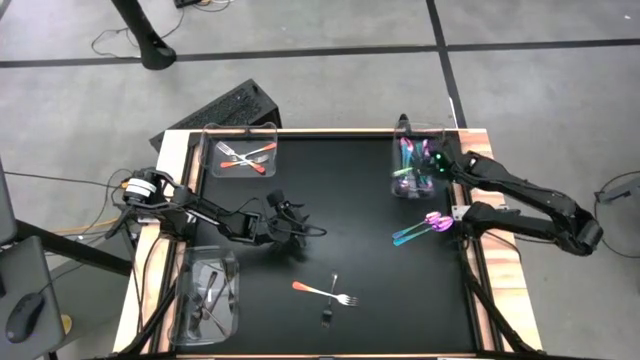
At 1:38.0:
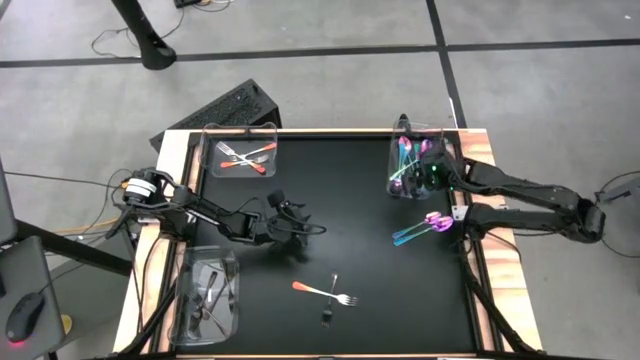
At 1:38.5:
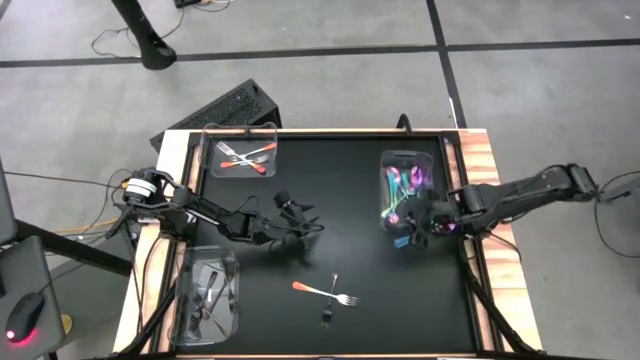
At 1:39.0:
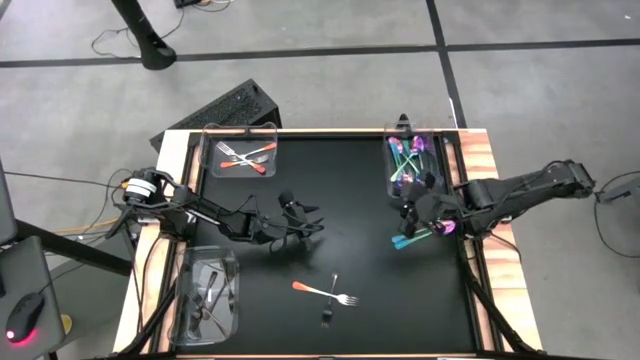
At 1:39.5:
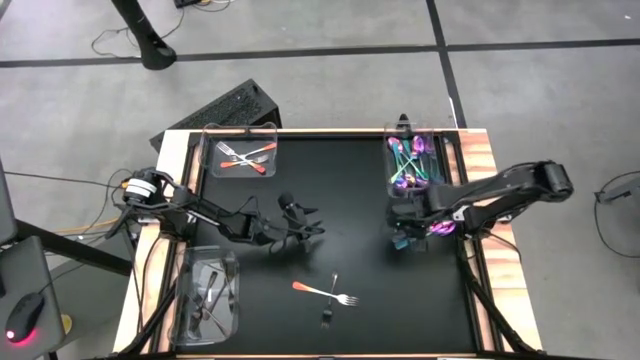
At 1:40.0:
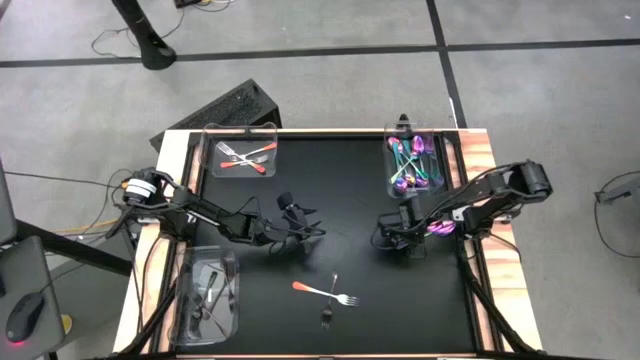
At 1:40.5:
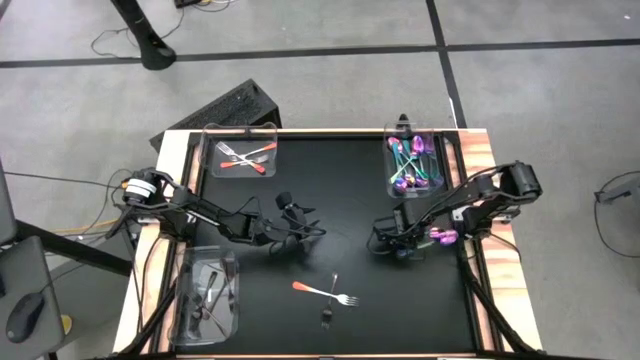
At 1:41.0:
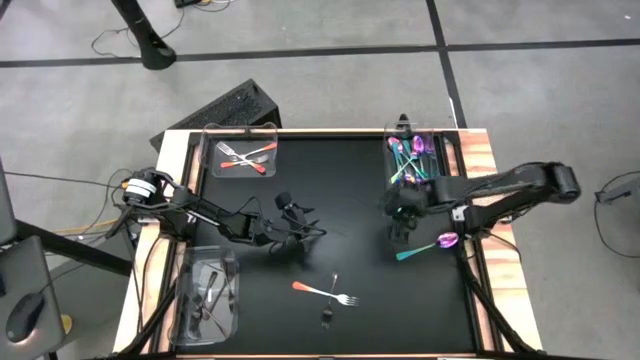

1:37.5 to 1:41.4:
Task: Sort silverware by color (type)
Put the violet spoon into the top right transparent bin

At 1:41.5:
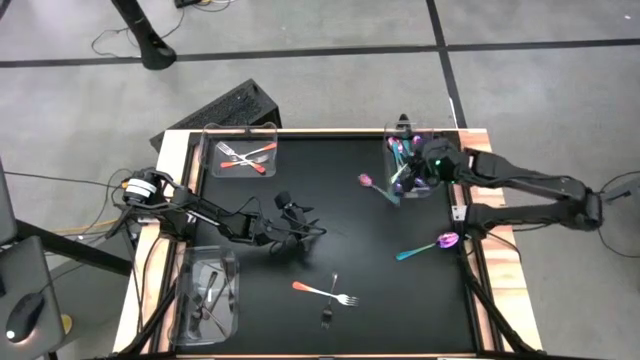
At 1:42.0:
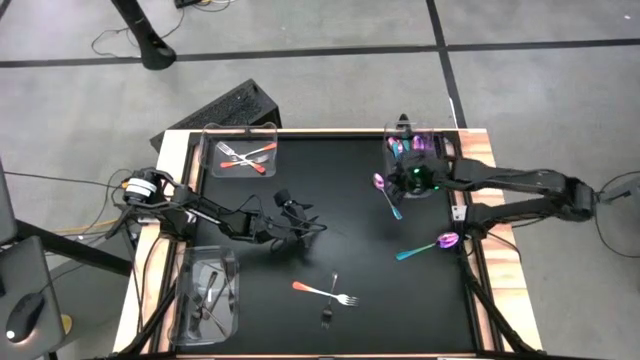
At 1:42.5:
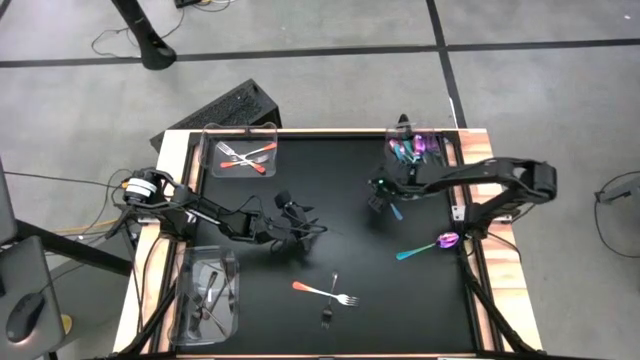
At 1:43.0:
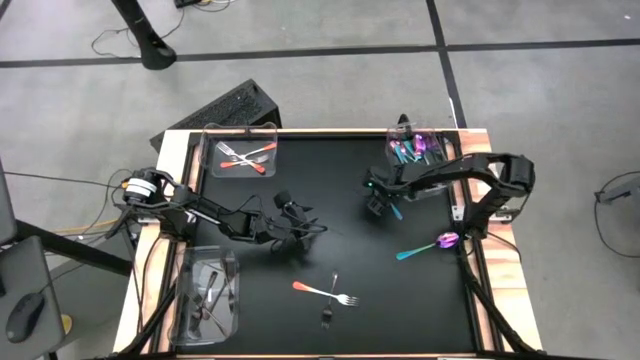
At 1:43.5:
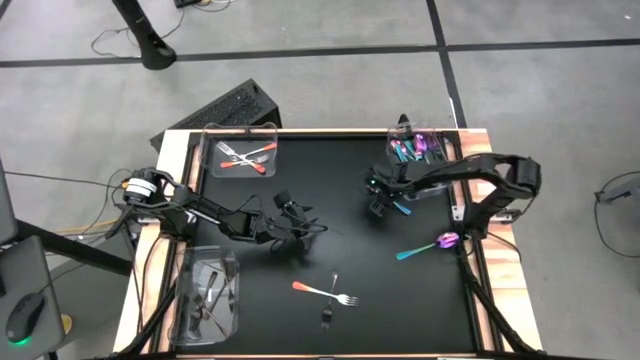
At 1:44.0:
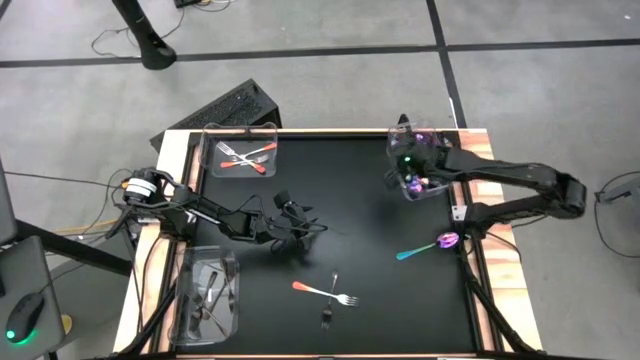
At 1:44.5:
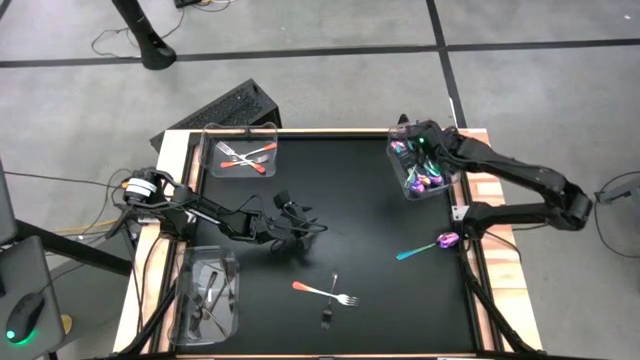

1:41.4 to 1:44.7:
Put the violet spoon into the top right transparent bin

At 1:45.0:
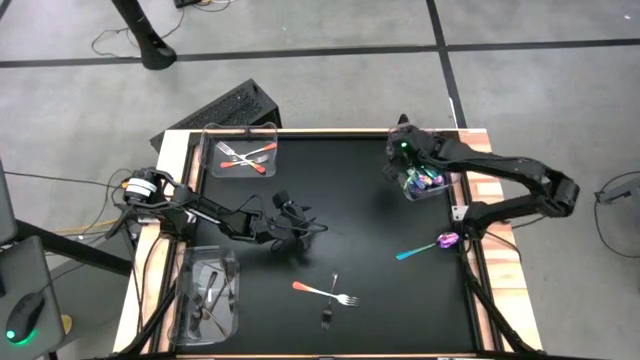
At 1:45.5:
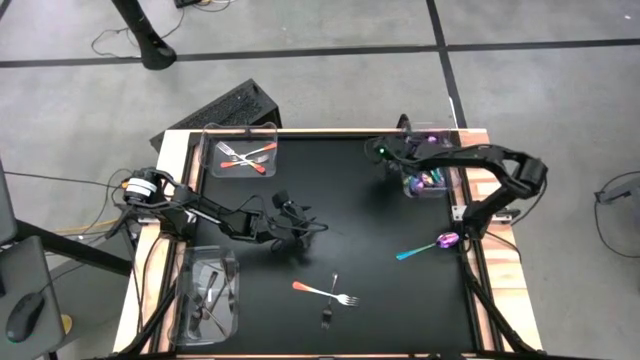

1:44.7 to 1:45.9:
Adjust the top right transparent bin

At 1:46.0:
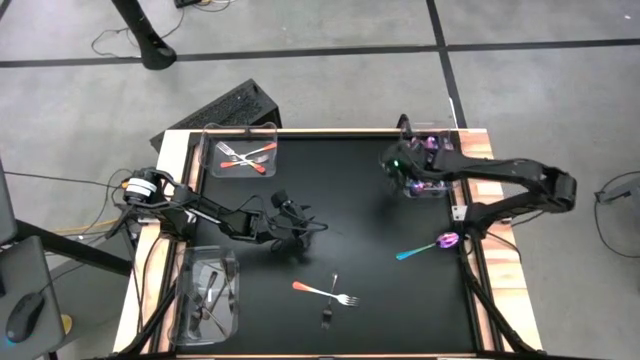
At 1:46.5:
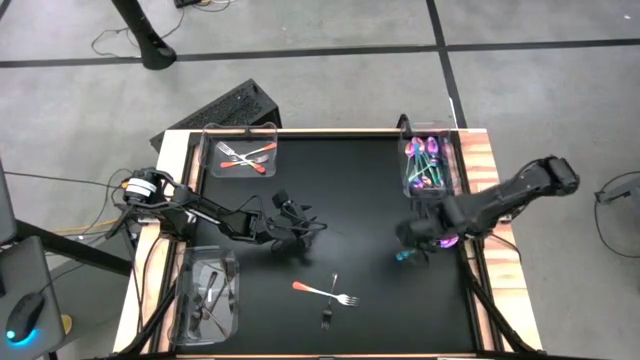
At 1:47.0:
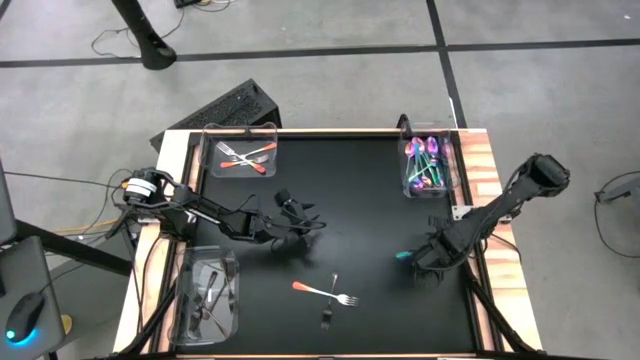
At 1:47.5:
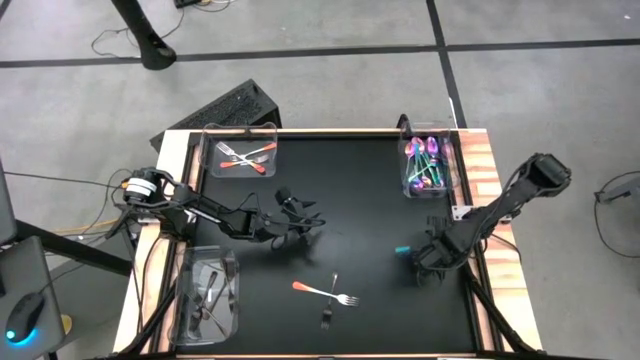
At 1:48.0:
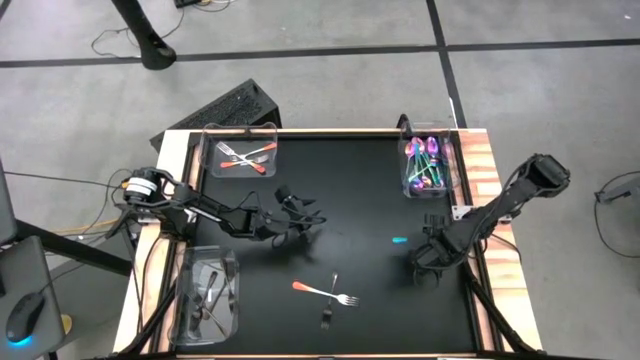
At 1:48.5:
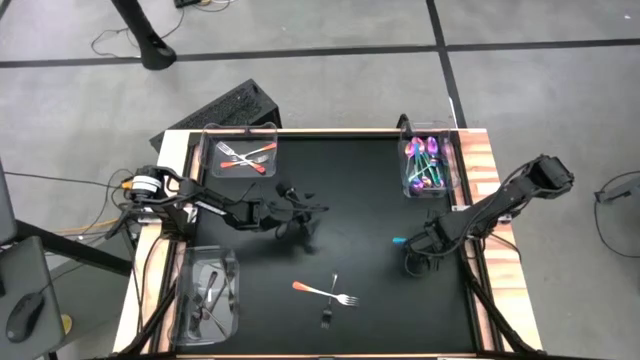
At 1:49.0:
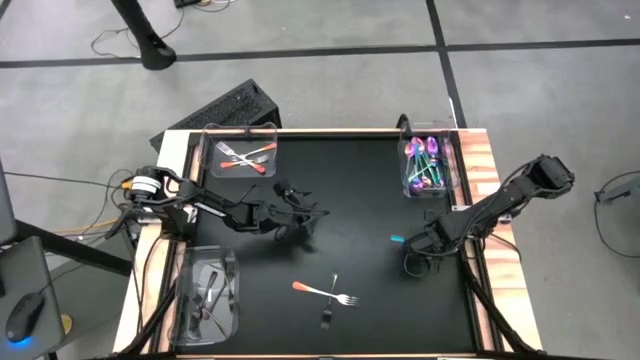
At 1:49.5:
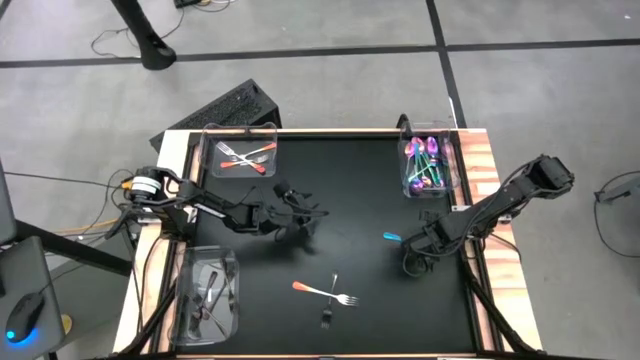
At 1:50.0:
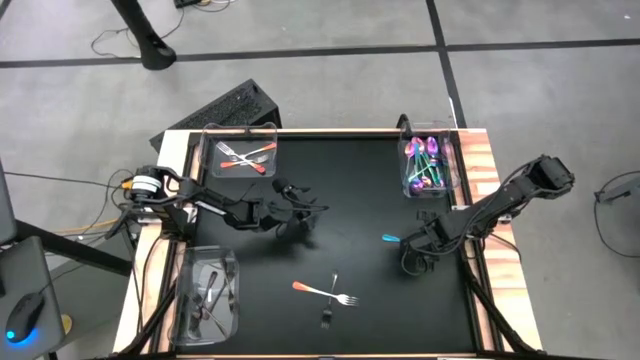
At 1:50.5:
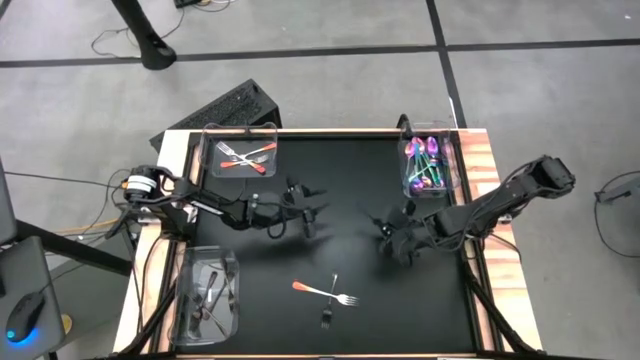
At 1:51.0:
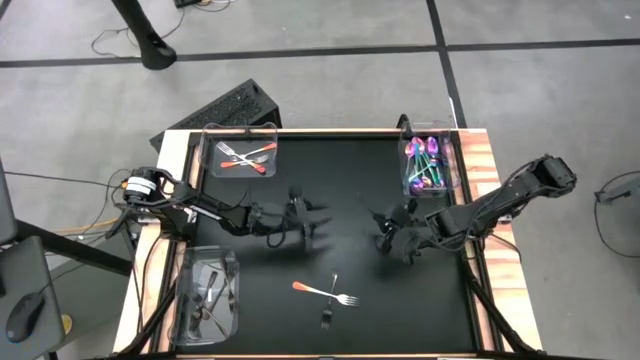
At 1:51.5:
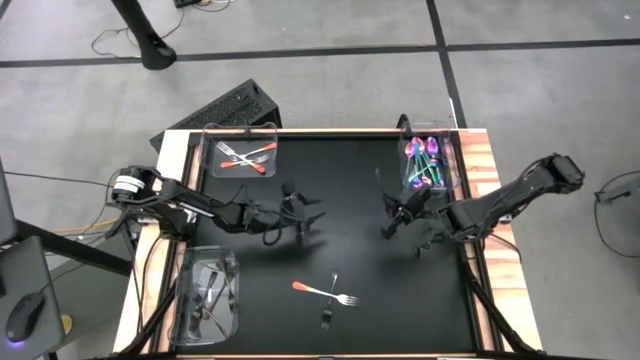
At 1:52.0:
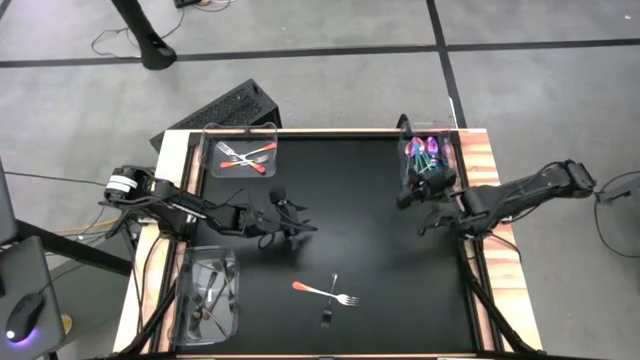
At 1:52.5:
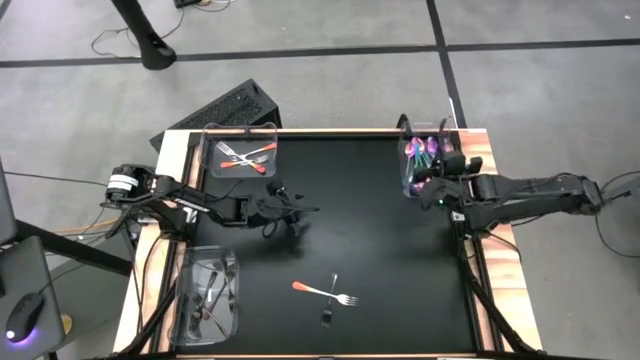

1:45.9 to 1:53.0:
Put the violet spoon into the top right transparent bin

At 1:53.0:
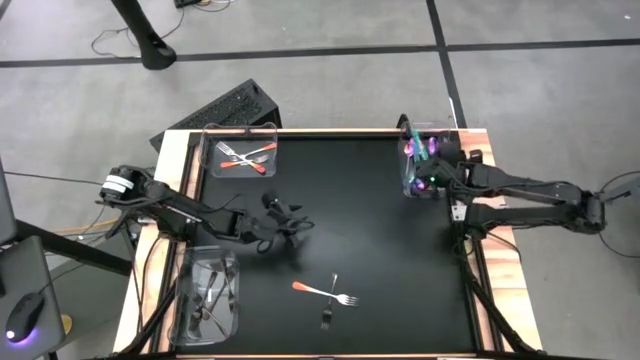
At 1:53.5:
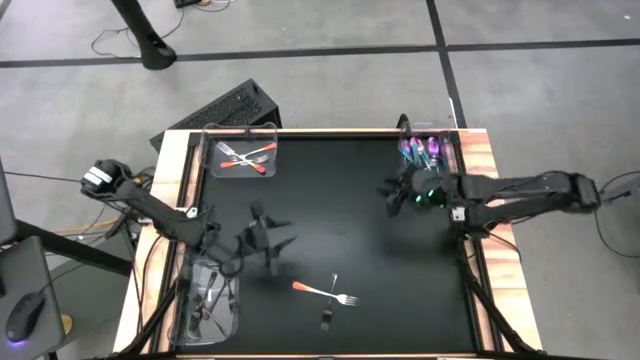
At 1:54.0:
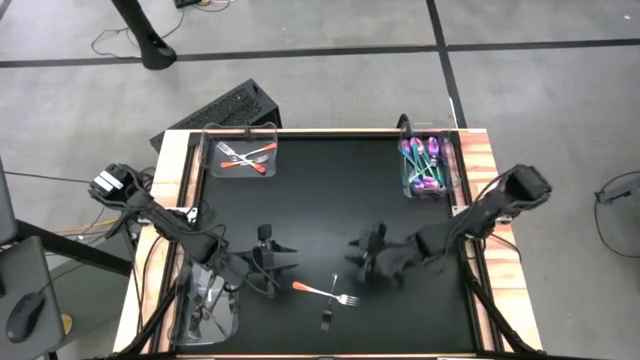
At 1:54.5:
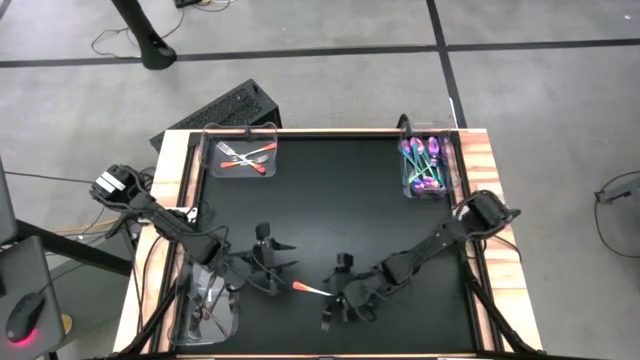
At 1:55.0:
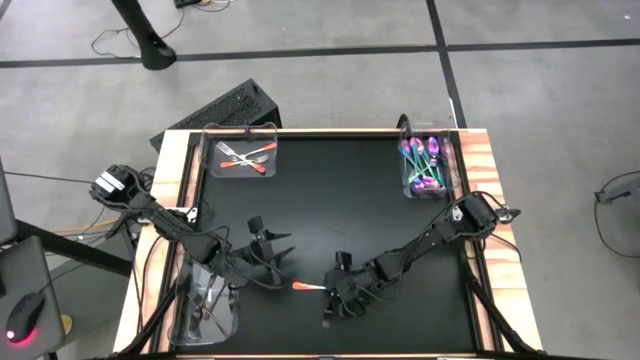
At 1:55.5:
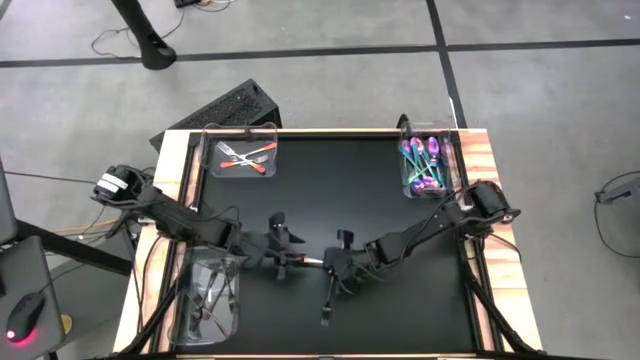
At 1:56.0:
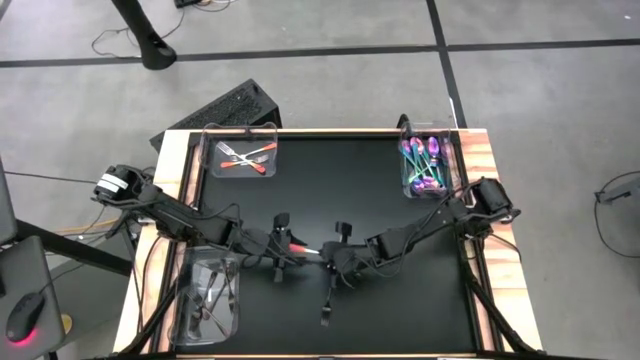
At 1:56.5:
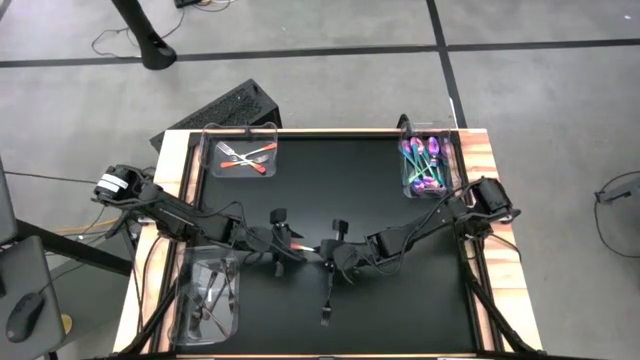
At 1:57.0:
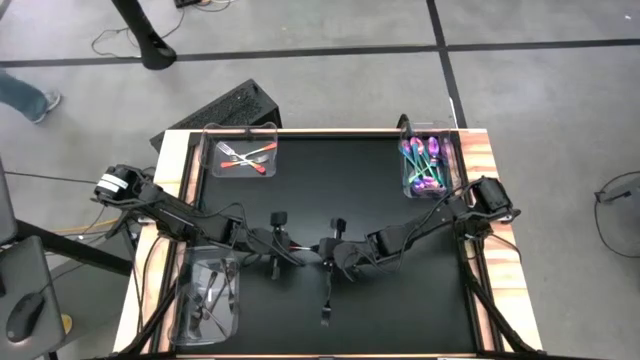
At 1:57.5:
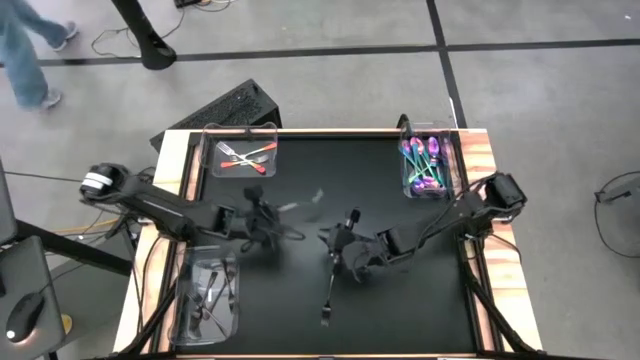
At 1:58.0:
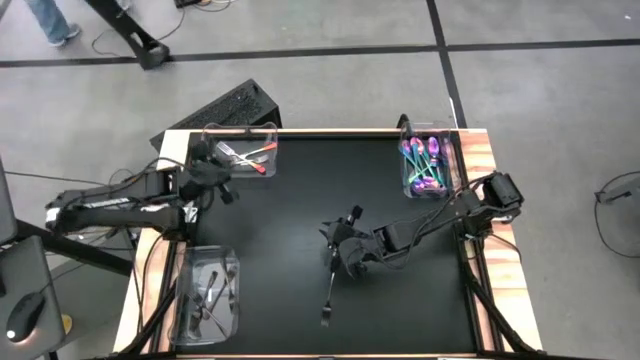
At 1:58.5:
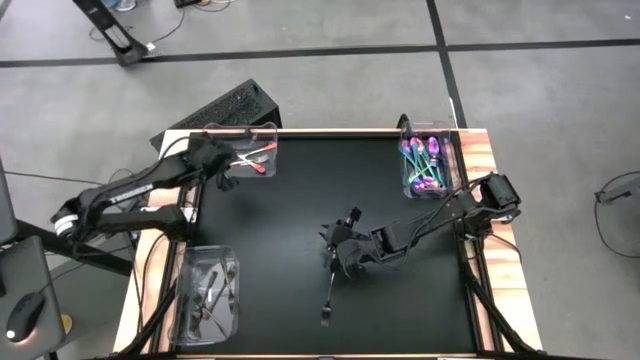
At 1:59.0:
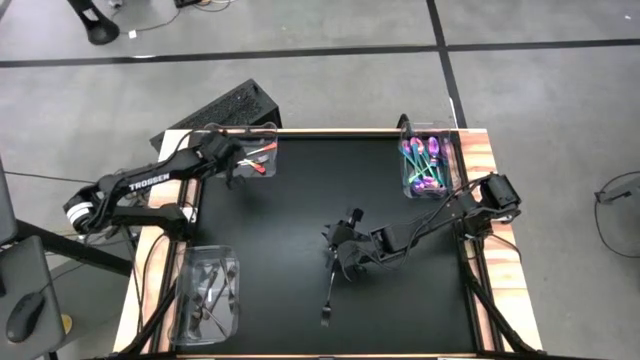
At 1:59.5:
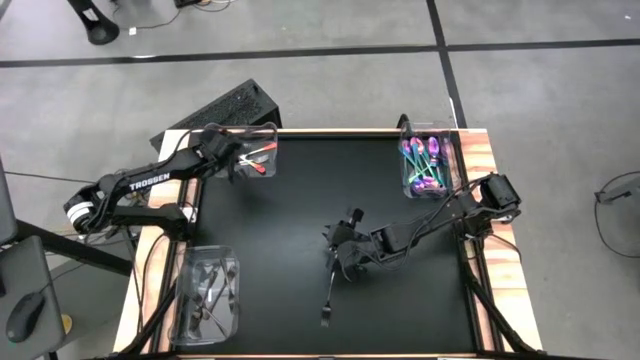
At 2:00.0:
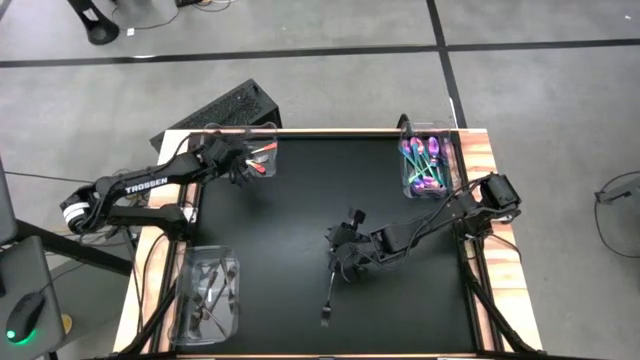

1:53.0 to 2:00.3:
Put the orange fork into the top left transparent bin
